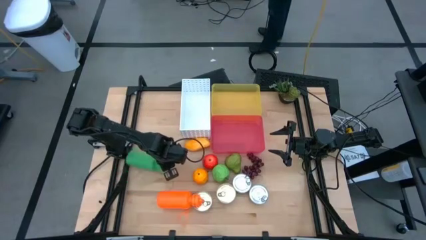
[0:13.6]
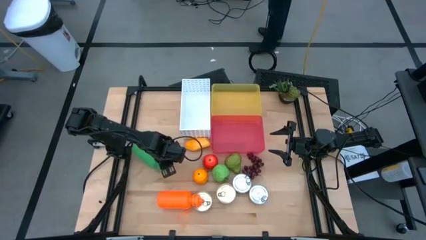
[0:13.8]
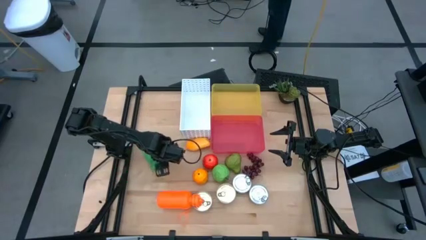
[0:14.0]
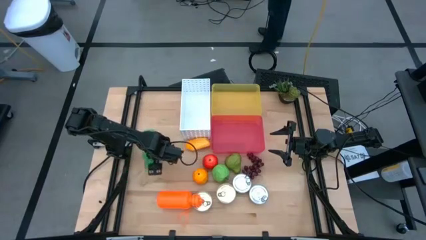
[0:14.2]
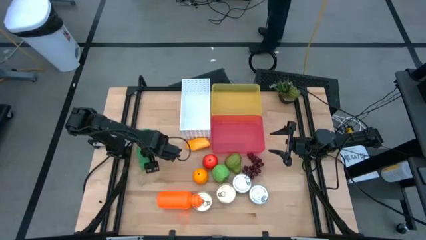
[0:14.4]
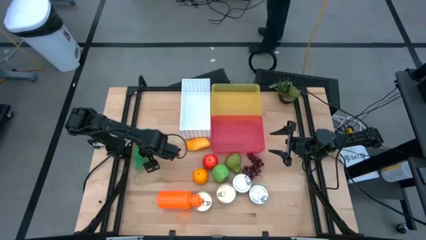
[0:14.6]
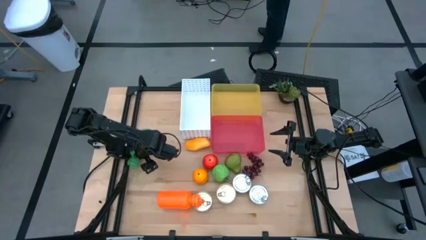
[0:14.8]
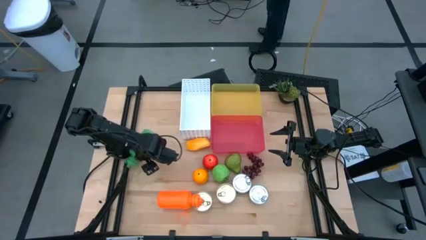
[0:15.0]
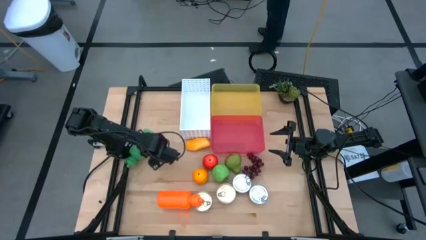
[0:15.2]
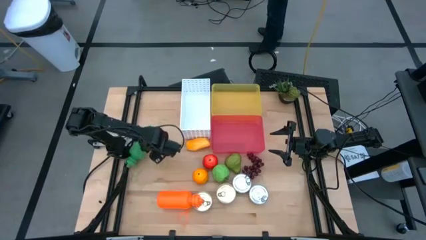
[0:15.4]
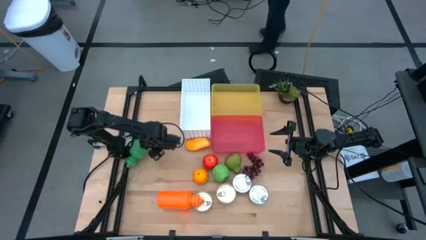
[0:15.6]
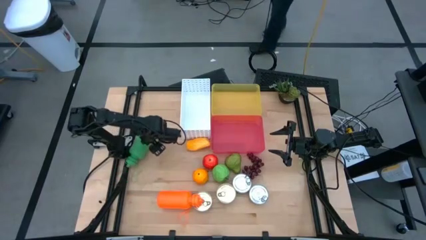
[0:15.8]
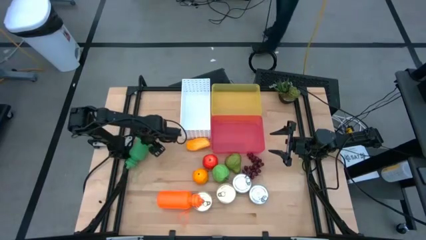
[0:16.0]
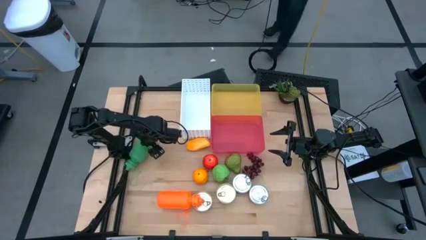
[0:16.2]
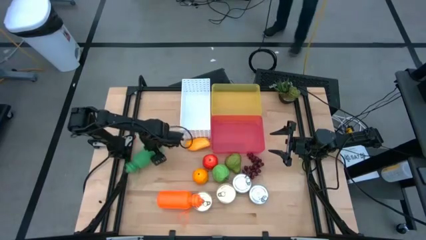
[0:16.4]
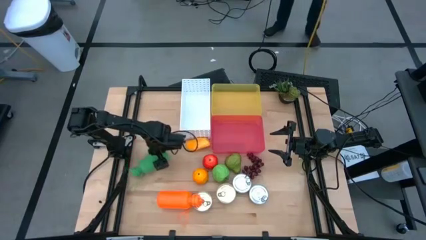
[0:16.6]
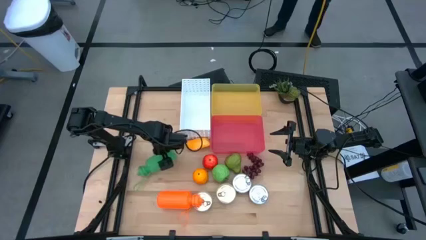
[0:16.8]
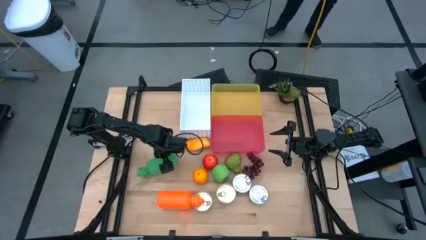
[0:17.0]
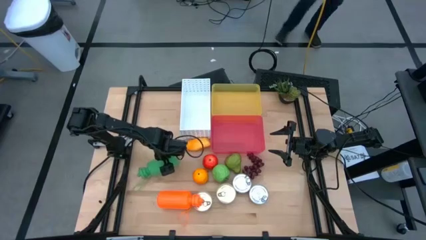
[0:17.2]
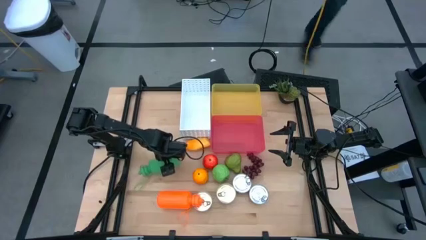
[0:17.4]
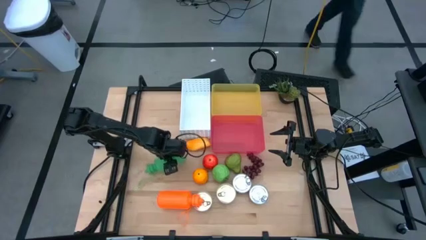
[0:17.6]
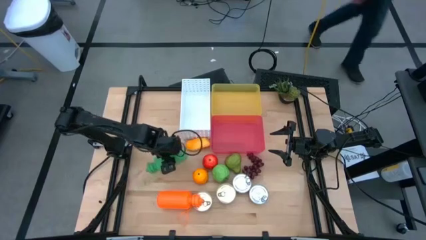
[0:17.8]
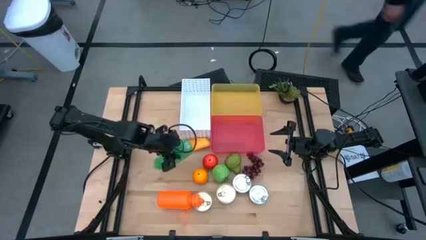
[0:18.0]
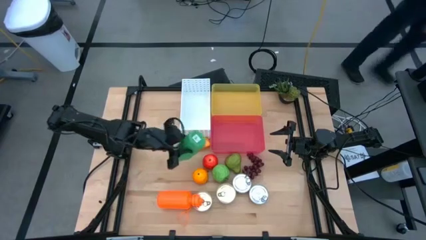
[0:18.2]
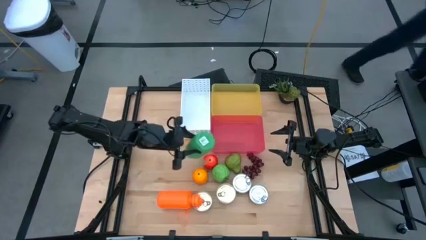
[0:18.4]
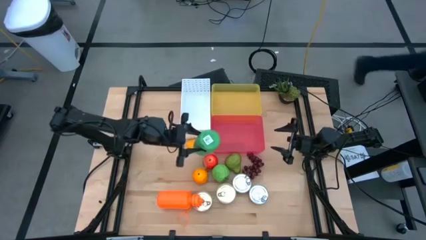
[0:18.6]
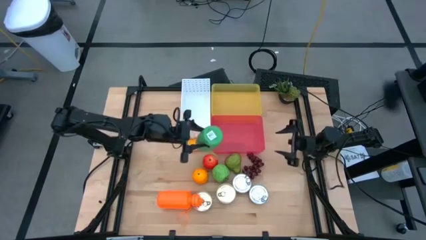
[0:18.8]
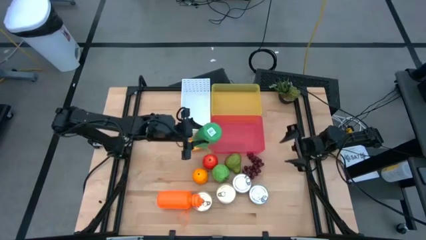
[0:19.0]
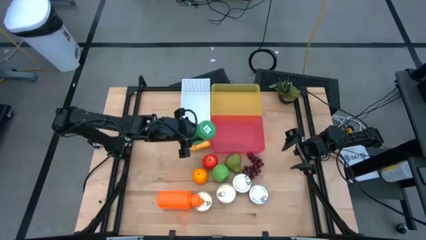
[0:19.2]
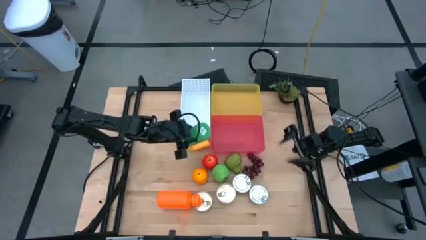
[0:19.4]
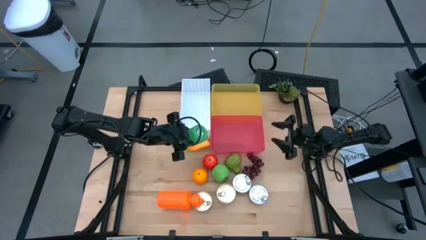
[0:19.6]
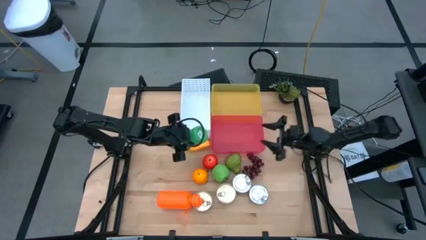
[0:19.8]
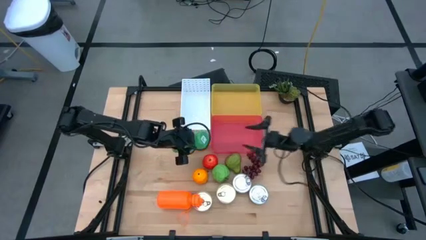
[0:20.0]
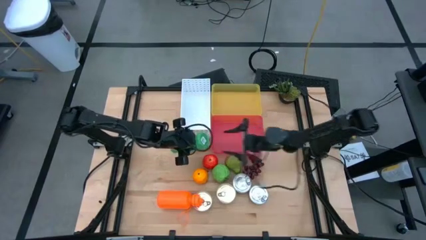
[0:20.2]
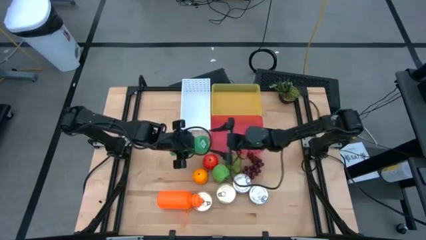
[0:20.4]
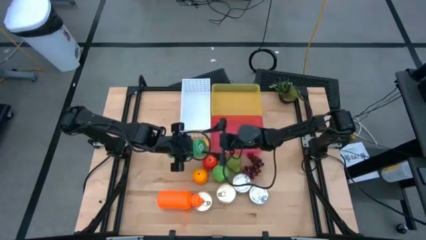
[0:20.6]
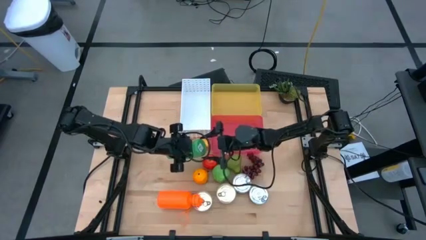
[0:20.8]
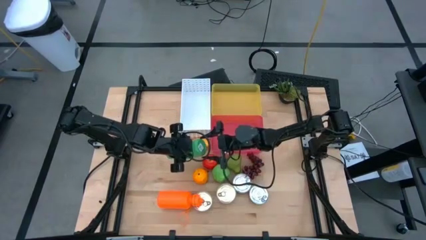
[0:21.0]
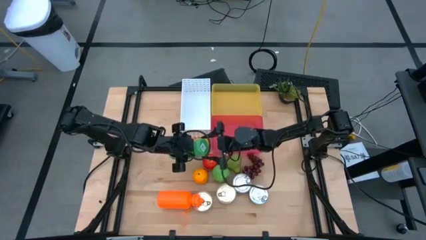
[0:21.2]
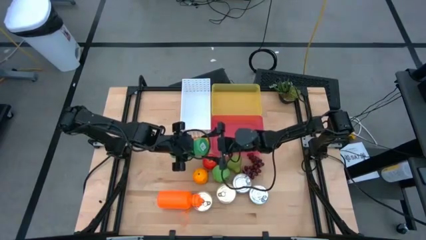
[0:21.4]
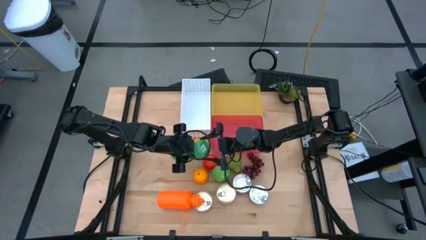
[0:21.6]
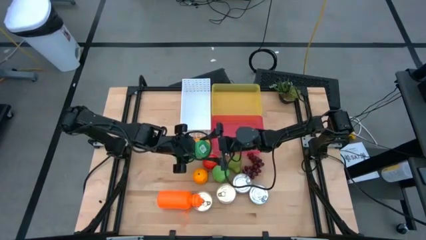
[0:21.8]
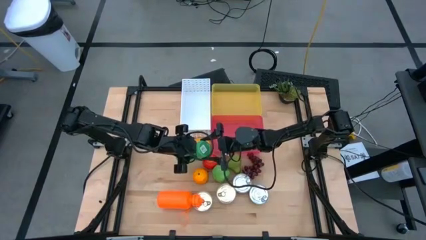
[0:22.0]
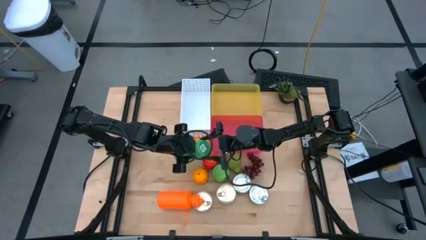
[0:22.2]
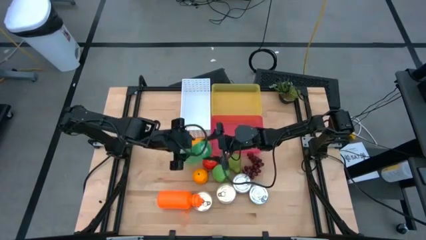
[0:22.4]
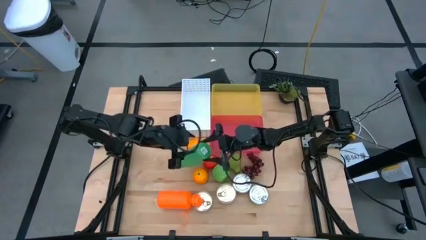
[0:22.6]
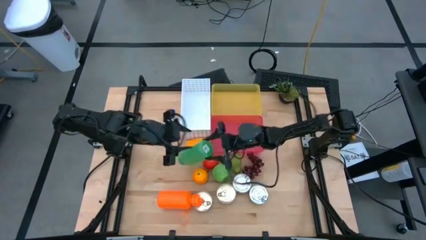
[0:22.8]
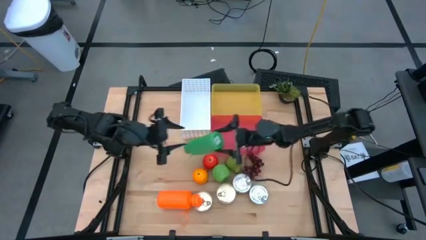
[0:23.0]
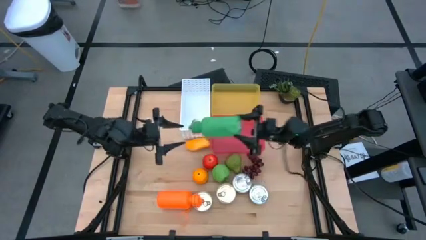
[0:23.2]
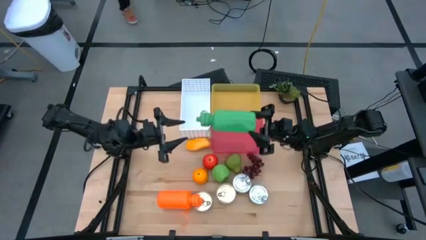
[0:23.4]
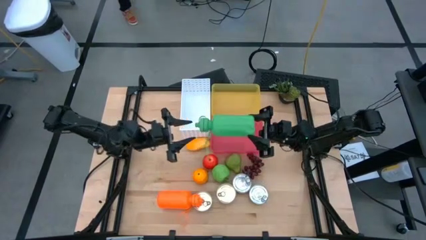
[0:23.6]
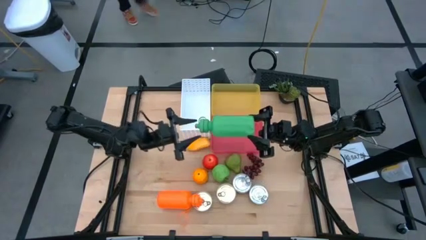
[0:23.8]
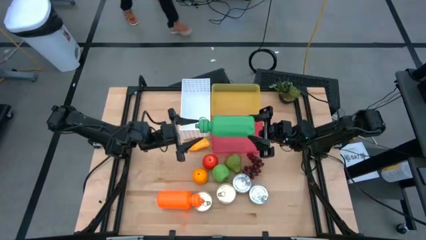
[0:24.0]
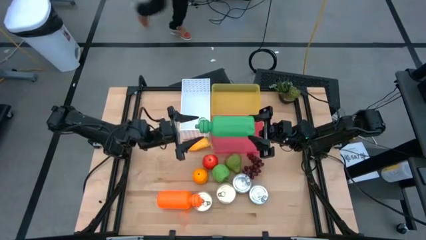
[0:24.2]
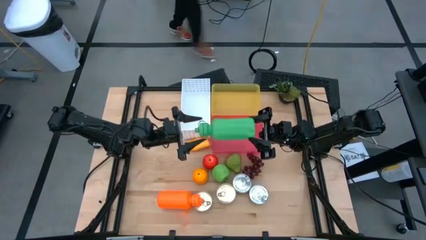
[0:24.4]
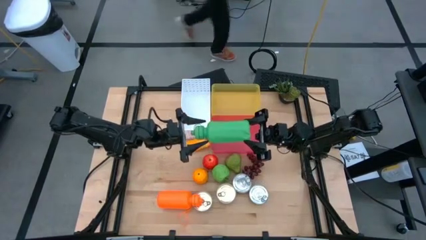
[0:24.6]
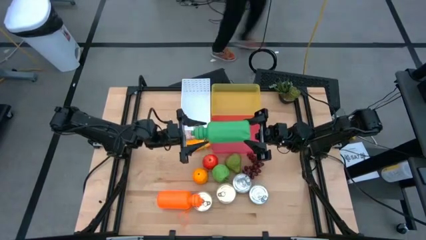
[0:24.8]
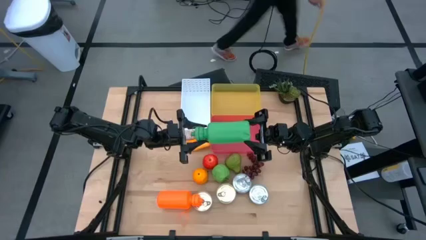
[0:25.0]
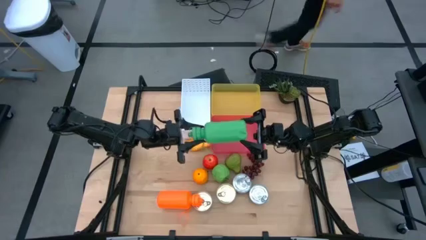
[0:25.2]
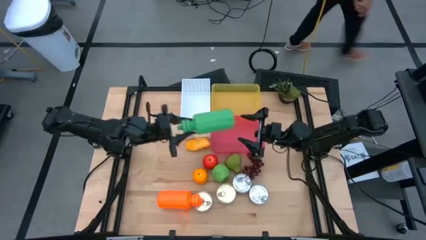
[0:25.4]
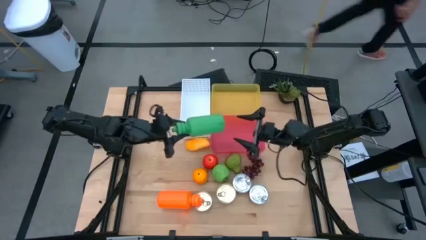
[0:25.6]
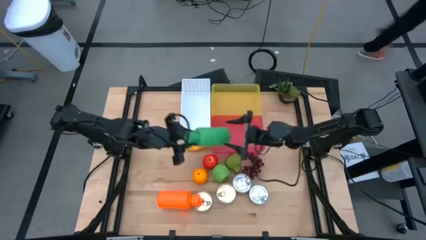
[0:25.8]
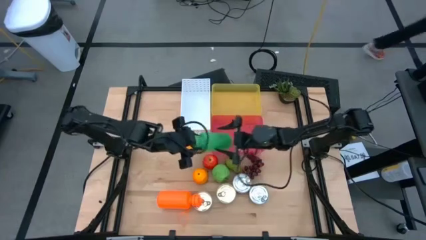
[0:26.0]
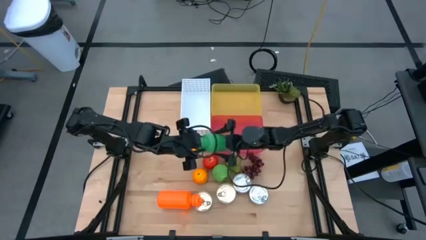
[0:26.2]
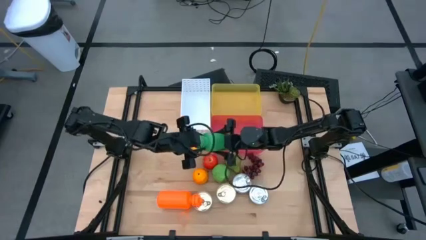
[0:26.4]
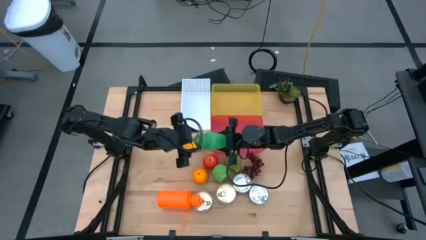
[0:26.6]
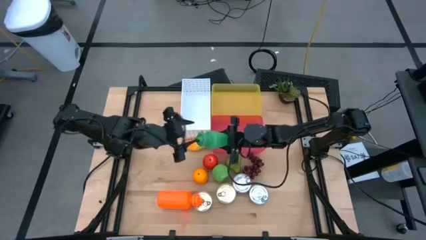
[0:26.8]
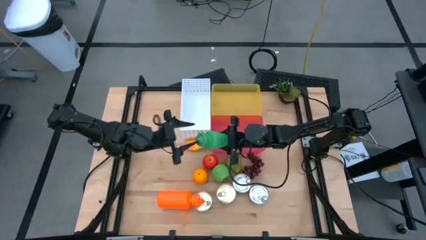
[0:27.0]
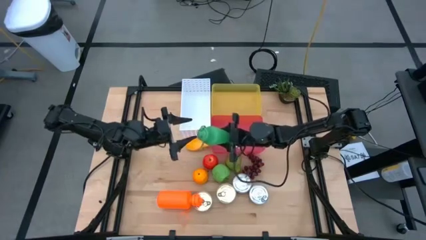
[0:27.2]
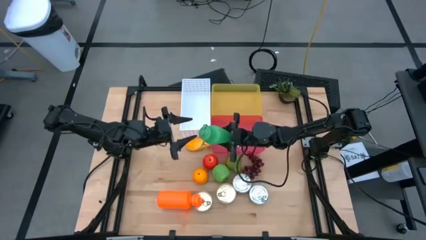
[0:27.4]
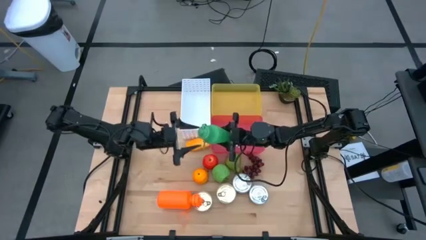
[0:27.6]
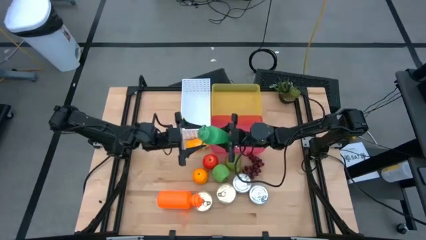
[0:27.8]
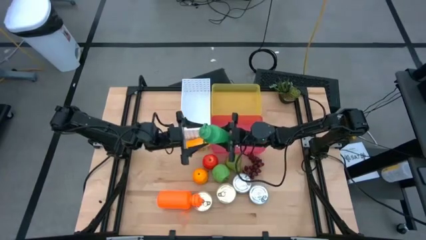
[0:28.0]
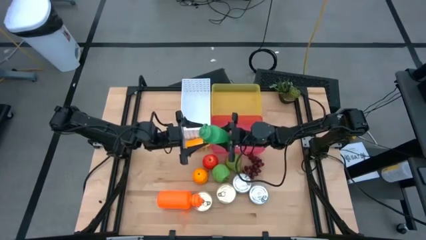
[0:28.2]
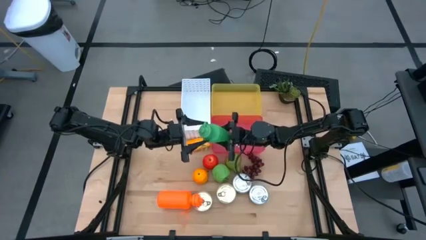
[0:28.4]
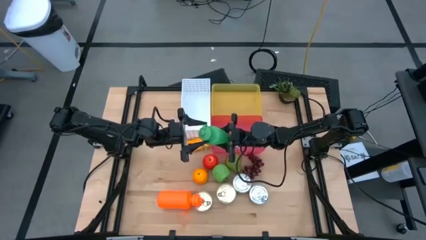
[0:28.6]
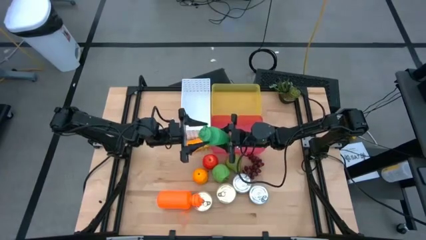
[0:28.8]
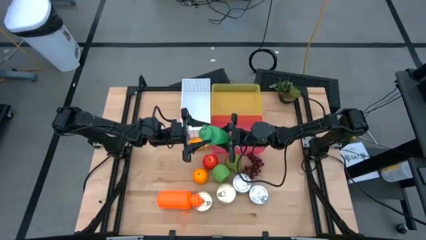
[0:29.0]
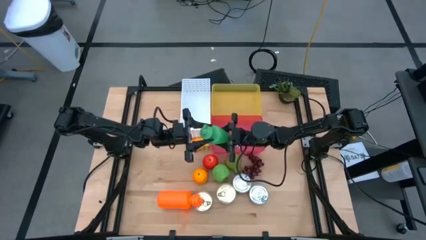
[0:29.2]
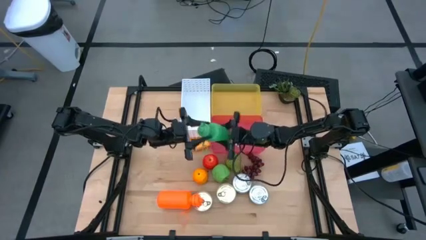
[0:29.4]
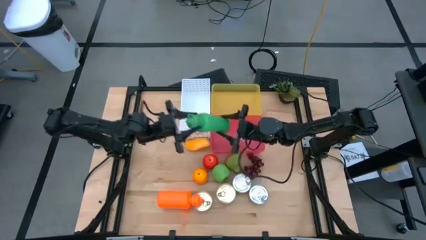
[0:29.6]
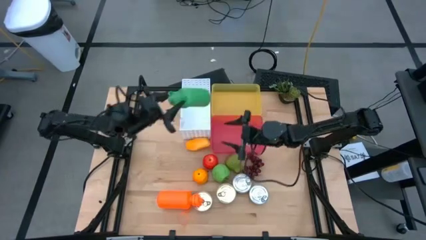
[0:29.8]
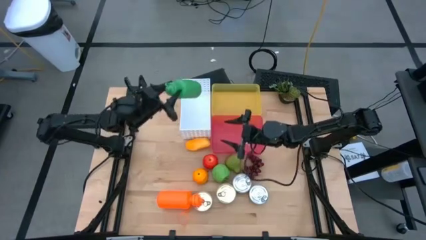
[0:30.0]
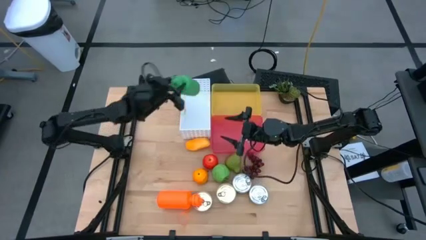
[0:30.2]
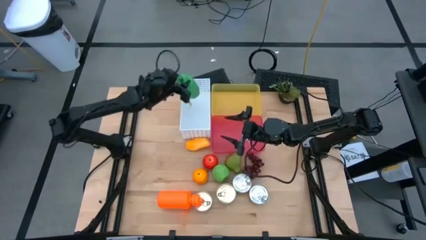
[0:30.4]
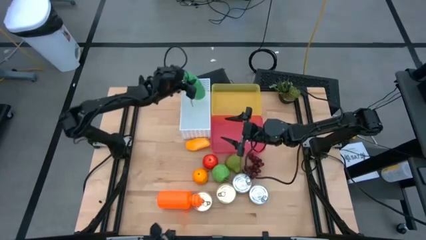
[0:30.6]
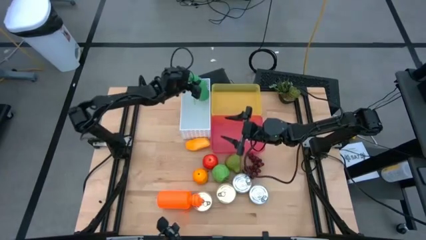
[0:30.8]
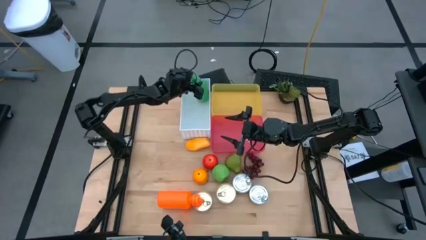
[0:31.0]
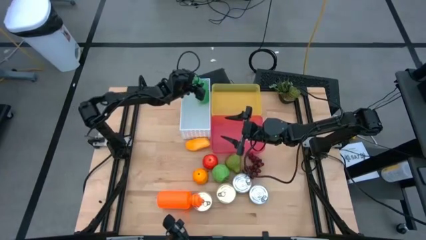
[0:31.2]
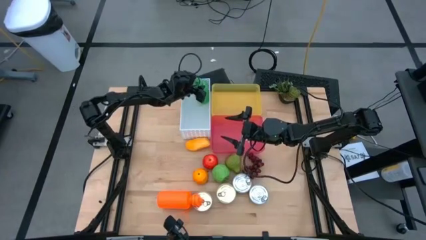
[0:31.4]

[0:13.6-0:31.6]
Task: Pick & Place Food Item
Put the green water bottle into the white bin
